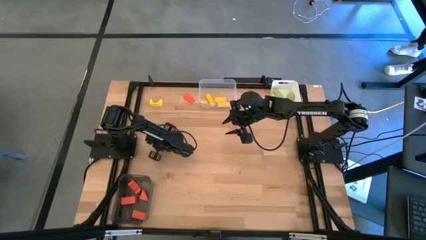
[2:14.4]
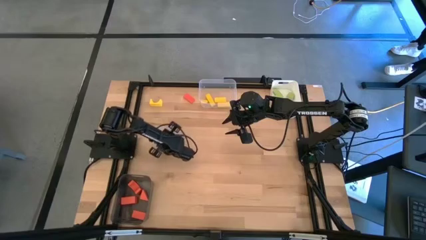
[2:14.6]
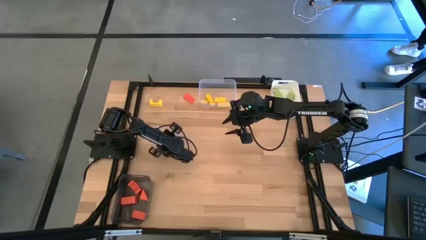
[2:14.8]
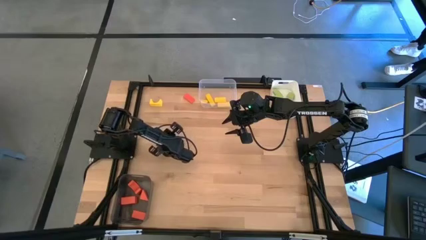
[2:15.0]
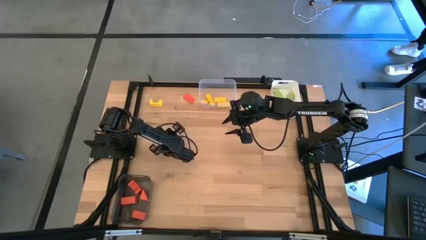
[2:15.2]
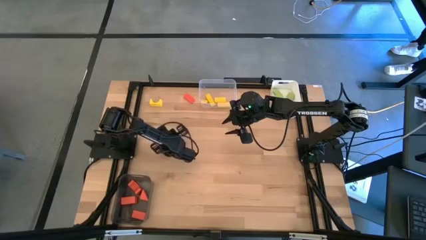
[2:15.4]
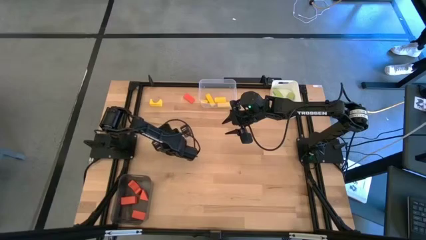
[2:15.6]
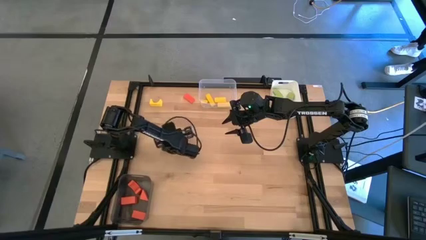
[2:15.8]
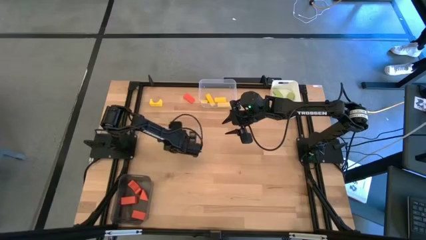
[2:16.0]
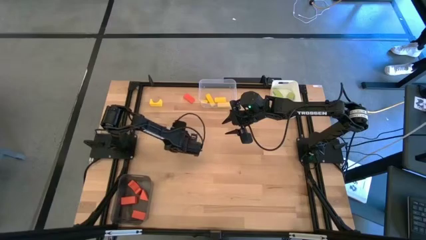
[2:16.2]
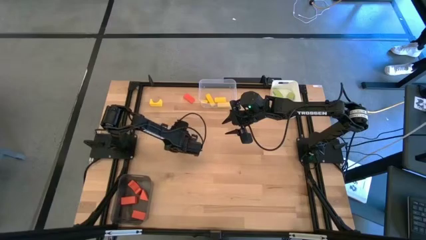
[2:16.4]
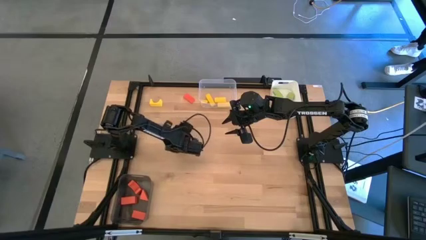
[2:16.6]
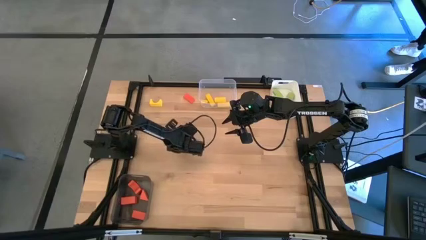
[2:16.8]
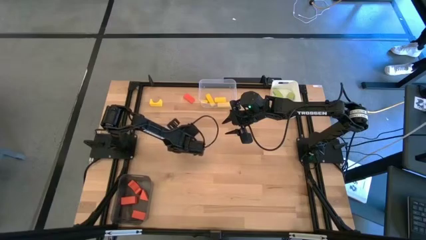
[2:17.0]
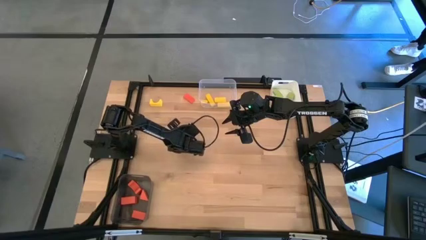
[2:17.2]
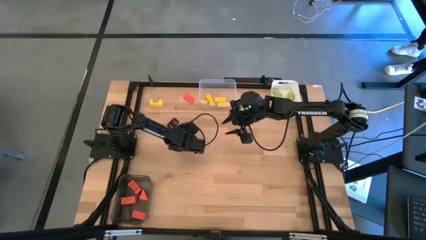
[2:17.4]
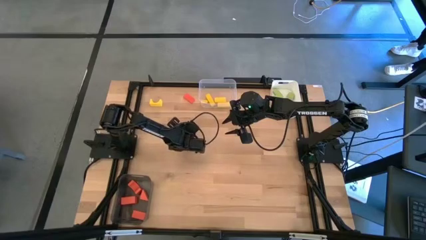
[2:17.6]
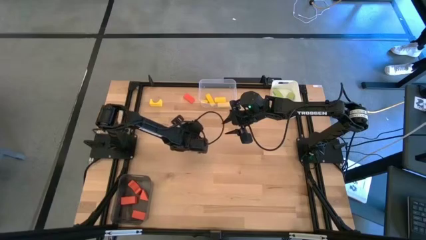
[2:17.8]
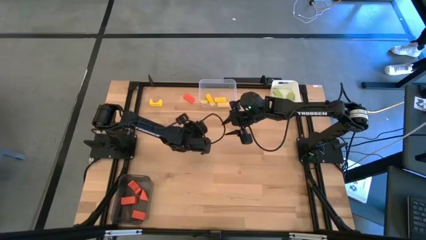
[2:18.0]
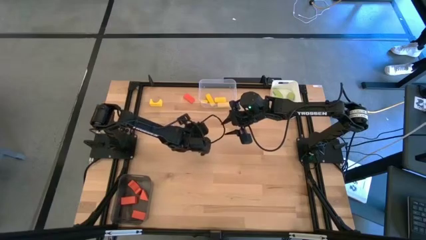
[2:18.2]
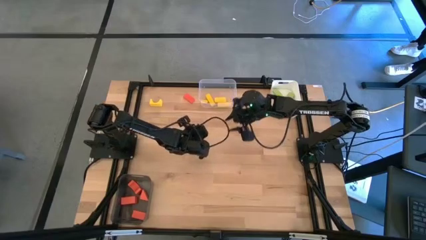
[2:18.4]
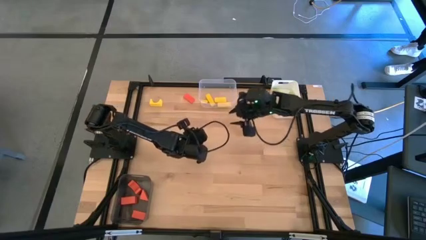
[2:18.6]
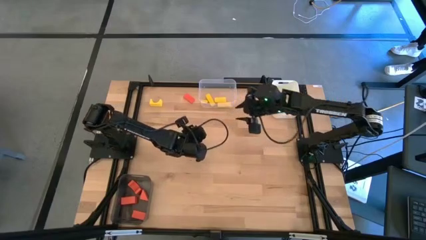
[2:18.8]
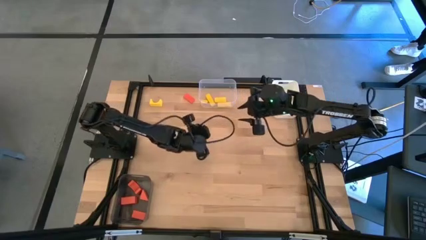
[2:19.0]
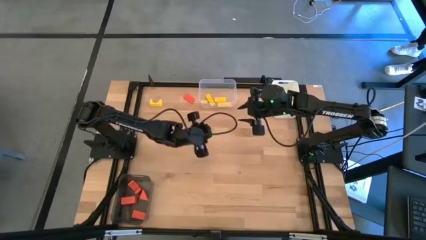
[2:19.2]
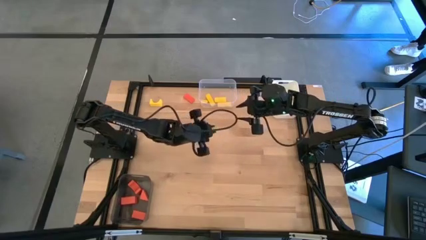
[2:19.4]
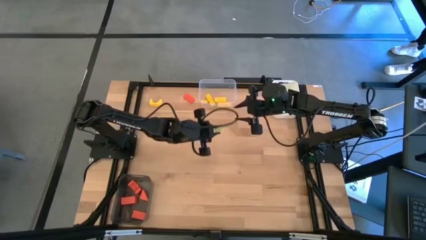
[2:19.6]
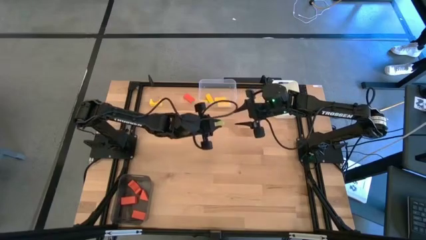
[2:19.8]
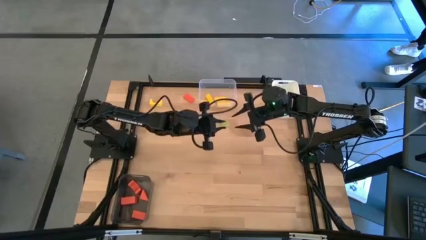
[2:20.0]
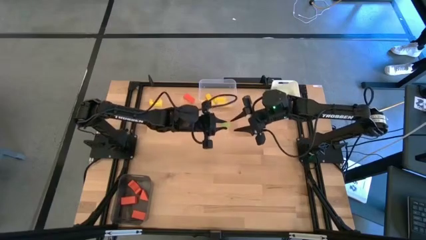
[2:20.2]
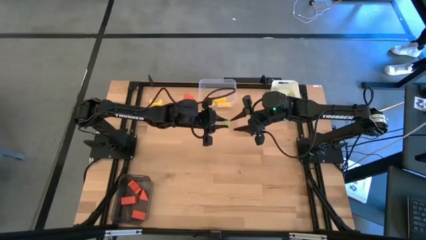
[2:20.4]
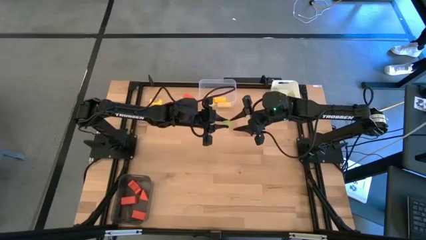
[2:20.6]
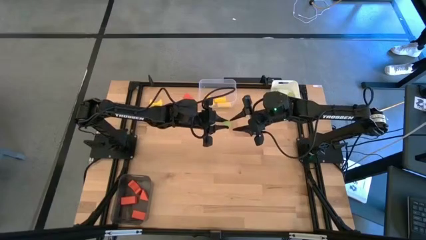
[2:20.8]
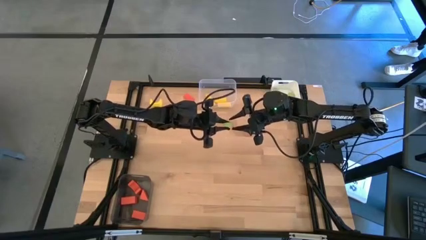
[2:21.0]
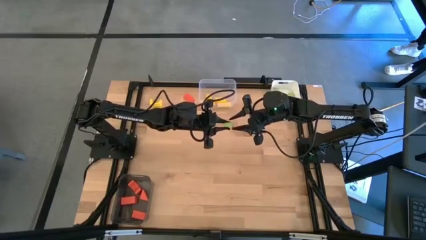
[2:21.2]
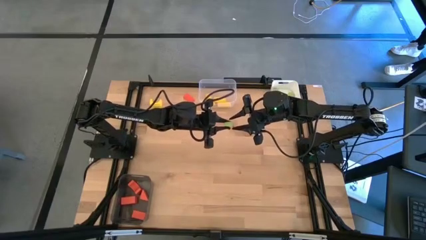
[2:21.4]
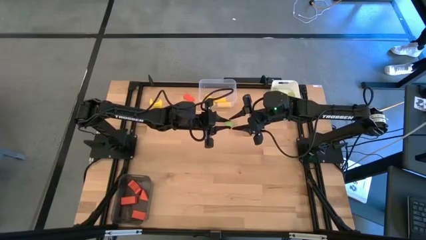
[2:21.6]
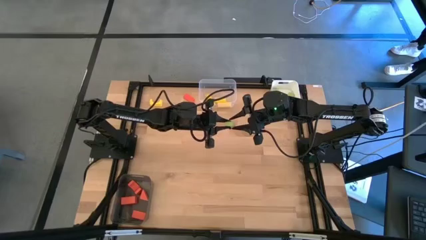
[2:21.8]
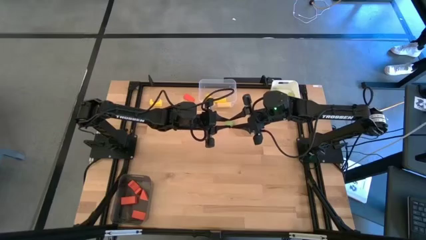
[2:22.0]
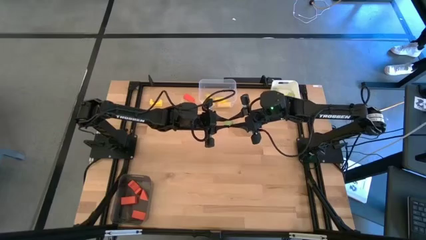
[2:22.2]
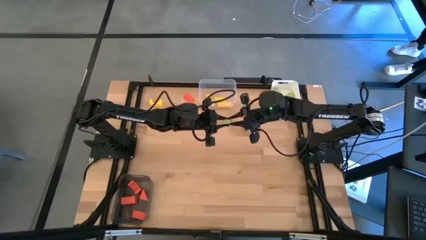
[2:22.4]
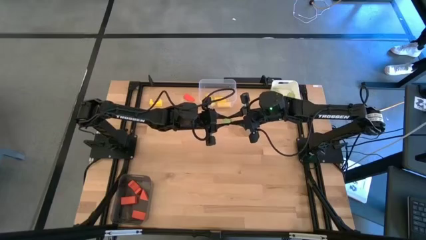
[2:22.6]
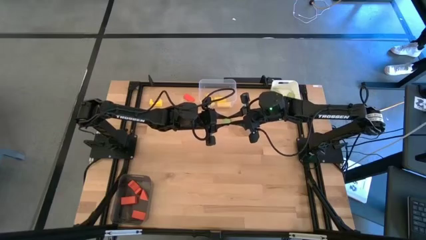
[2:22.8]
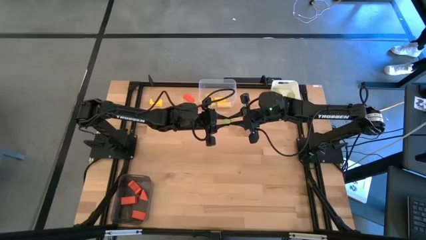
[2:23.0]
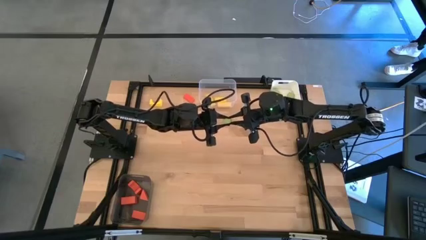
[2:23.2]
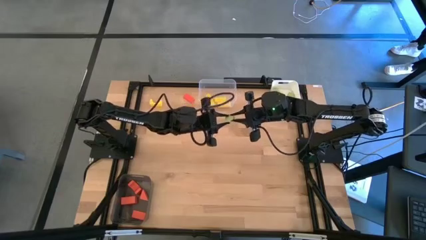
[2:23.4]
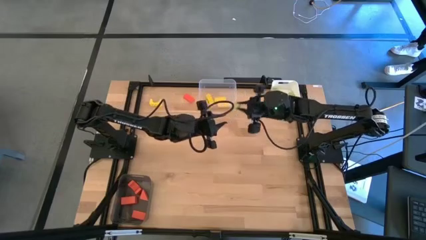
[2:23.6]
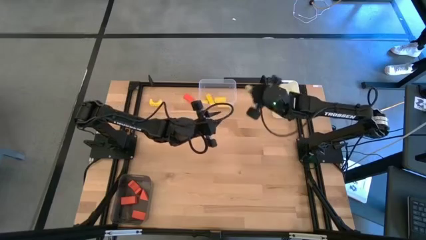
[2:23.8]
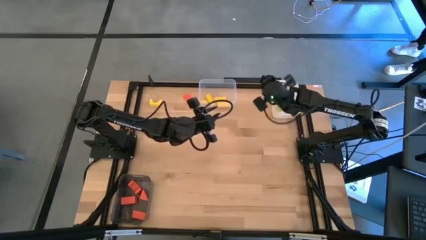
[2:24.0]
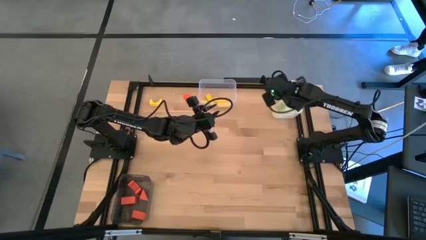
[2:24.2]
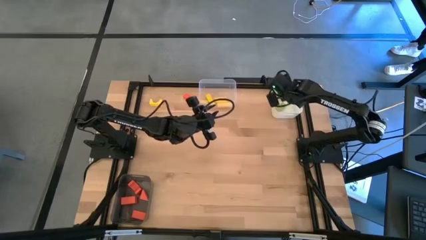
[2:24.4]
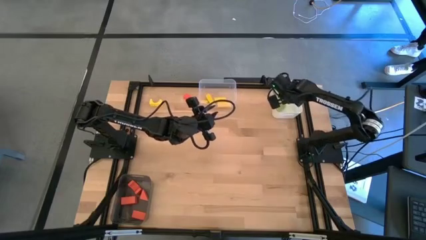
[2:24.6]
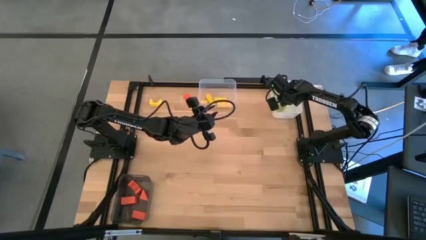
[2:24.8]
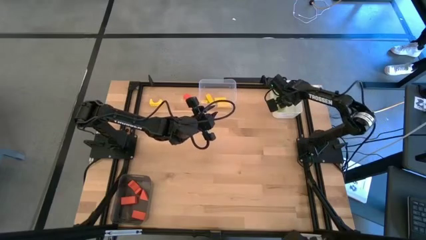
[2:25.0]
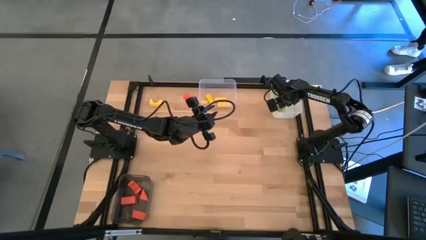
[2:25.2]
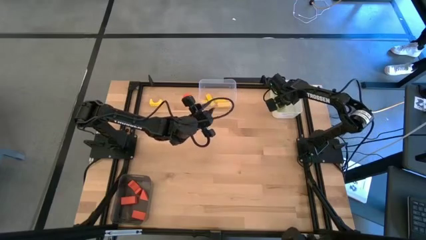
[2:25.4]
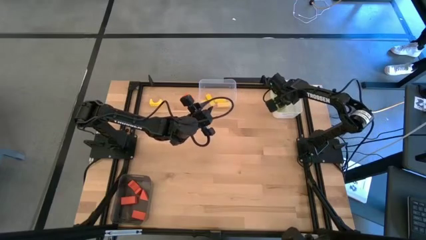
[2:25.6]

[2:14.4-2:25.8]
Task: Sort & place blocks by color
Put the green semi-circled block into the white bin

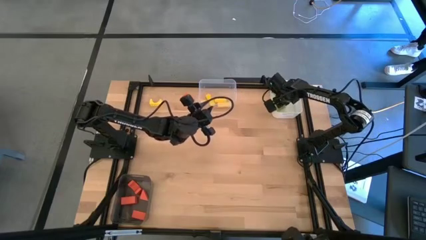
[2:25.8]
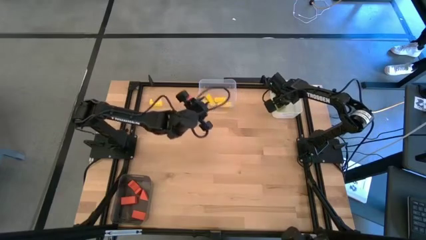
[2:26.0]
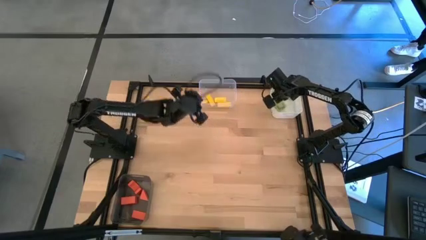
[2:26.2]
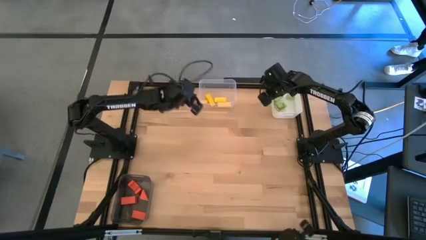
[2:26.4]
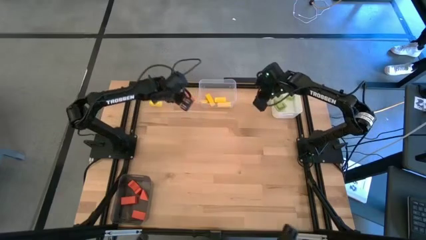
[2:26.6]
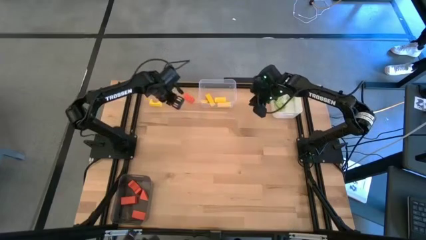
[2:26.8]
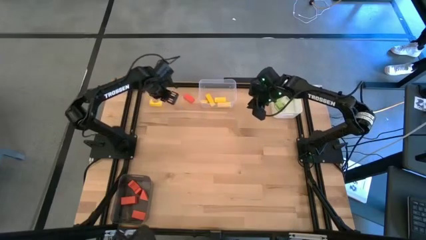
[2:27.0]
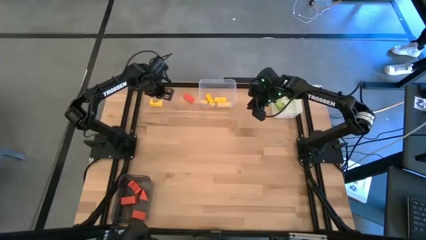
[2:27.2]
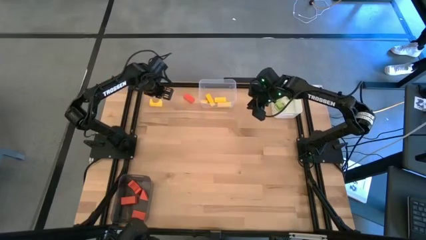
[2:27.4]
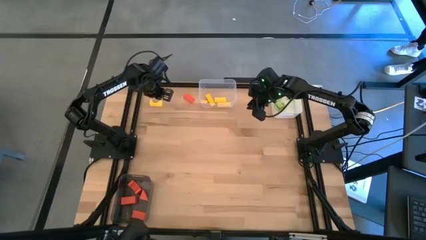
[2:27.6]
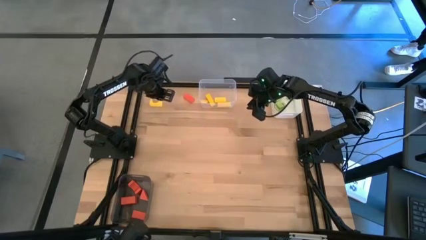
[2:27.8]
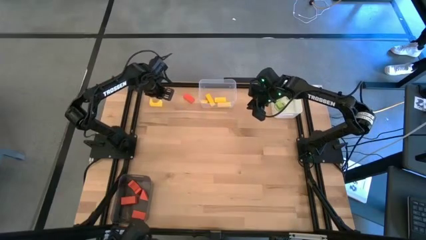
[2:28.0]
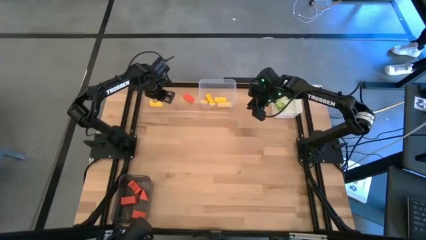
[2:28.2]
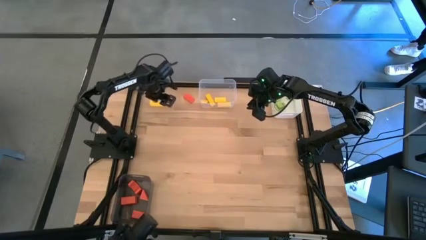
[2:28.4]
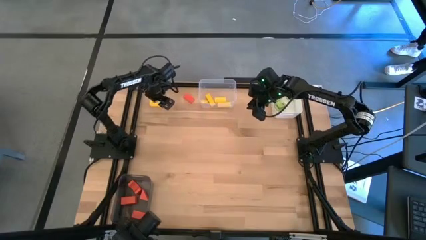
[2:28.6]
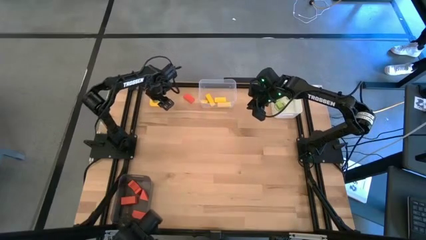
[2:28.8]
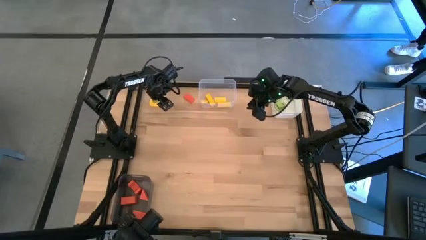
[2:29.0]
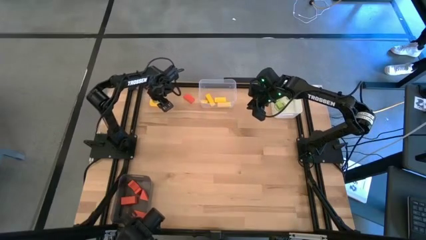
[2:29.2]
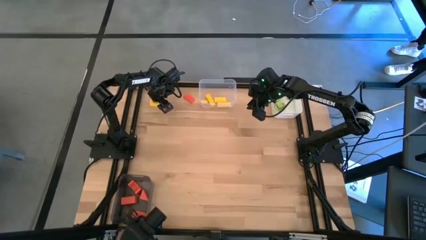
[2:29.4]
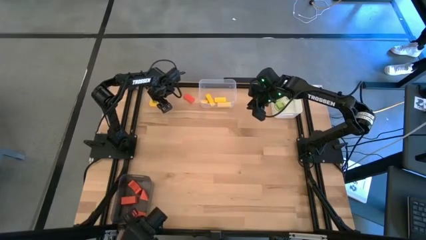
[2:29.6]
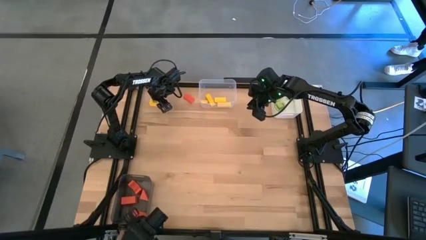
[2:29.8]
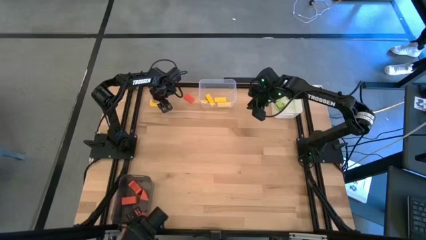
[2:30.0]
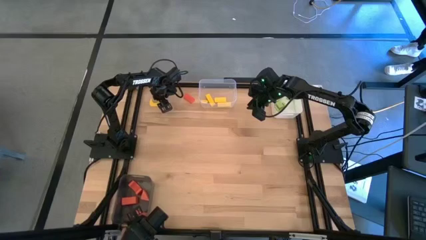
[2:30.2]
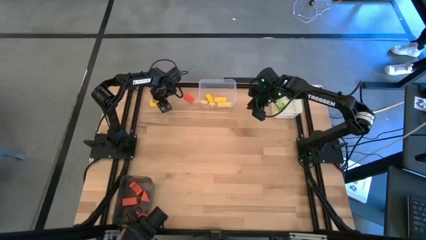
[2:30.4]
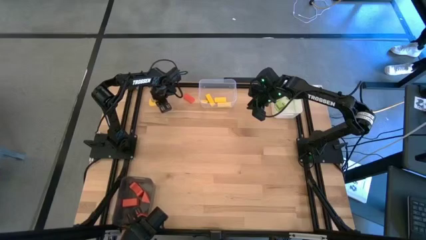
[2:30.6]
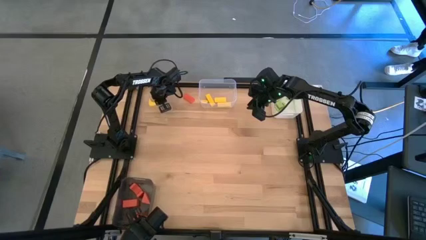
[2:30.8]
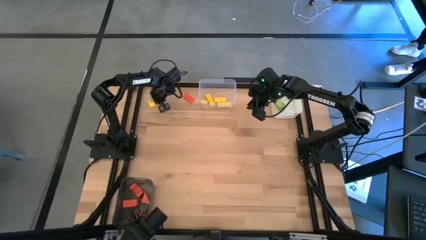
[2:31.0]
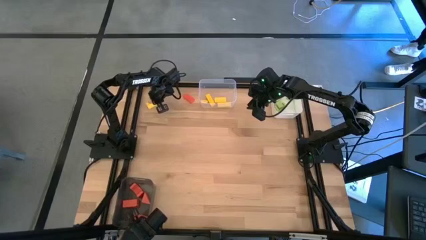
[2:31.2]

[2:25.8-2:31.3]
Put the arched block into the transparent bin
